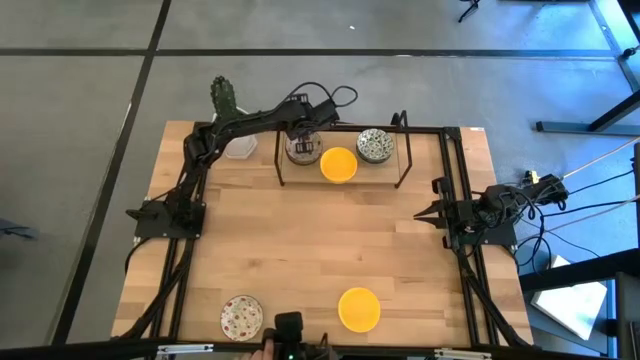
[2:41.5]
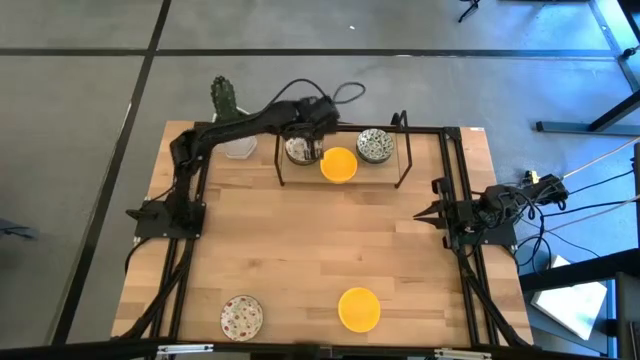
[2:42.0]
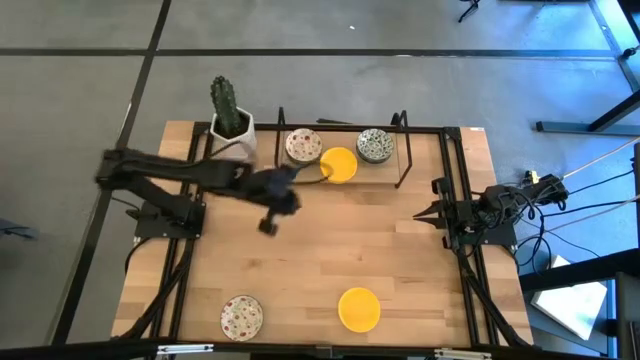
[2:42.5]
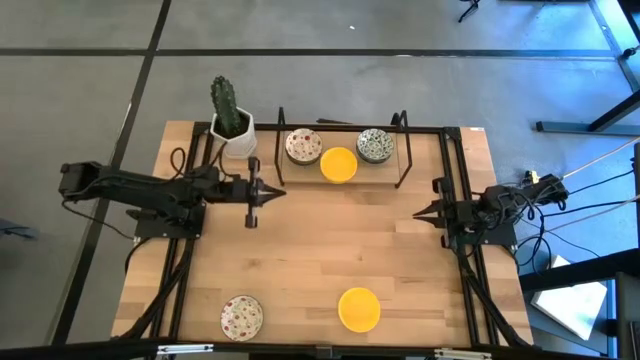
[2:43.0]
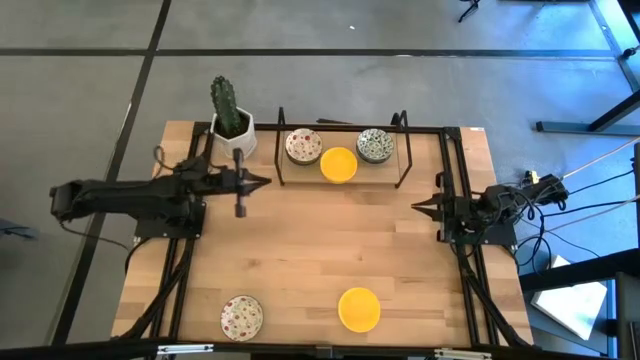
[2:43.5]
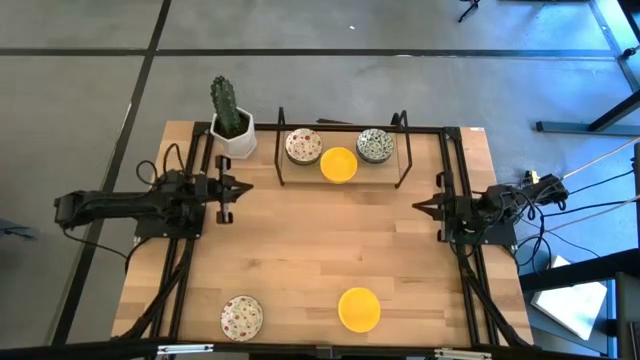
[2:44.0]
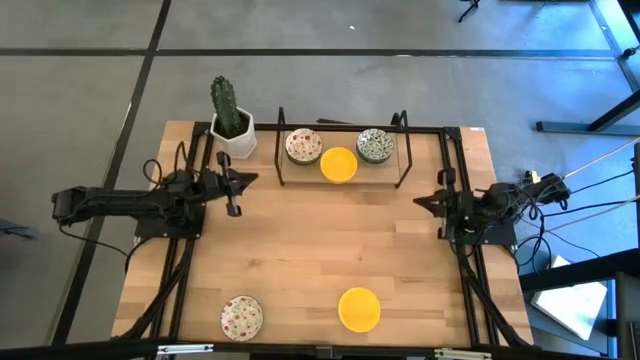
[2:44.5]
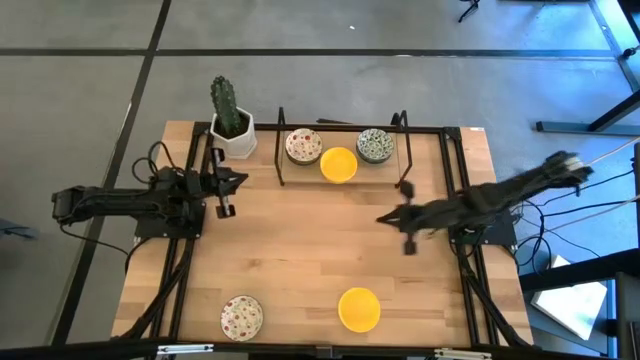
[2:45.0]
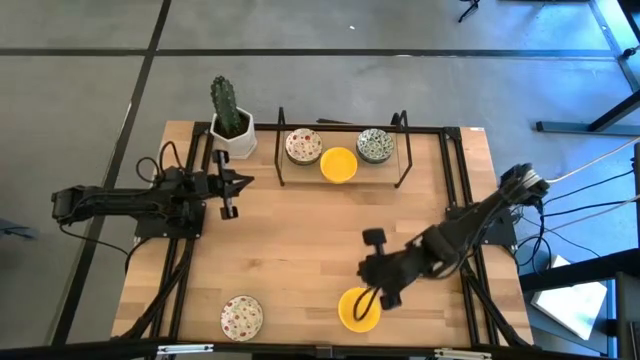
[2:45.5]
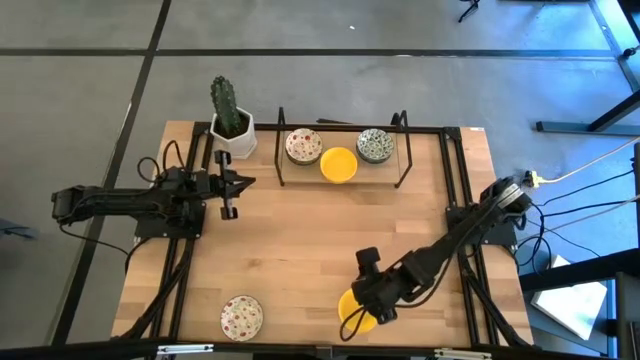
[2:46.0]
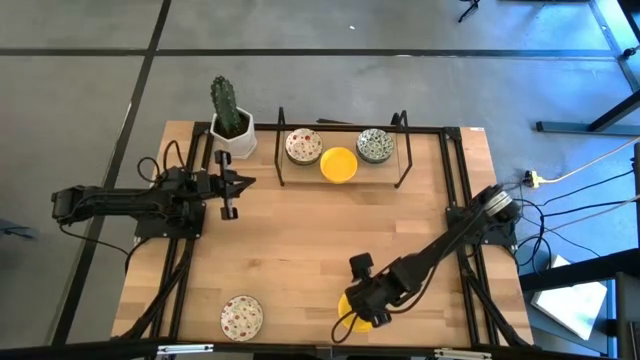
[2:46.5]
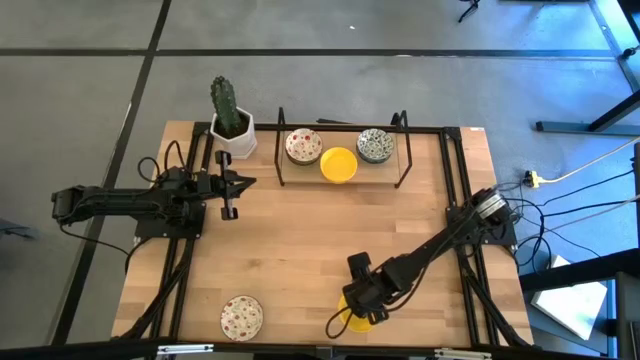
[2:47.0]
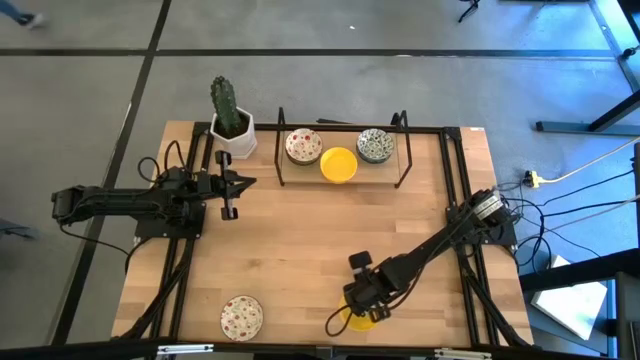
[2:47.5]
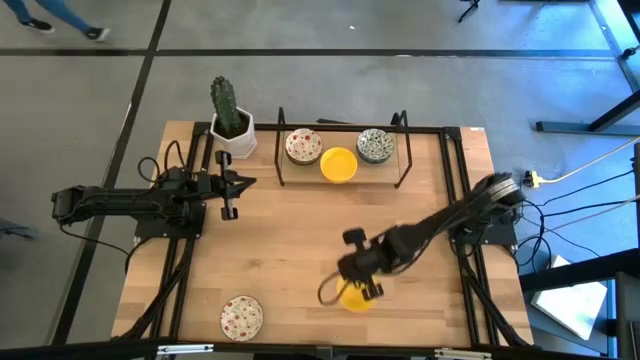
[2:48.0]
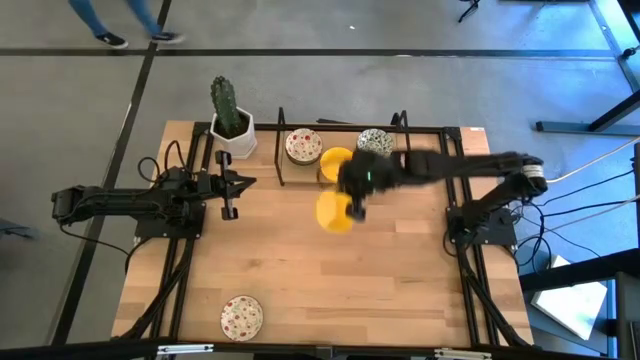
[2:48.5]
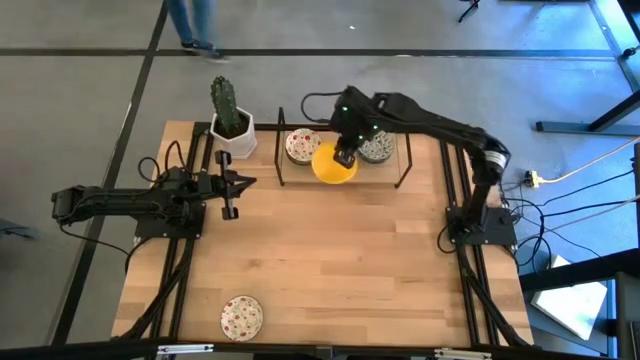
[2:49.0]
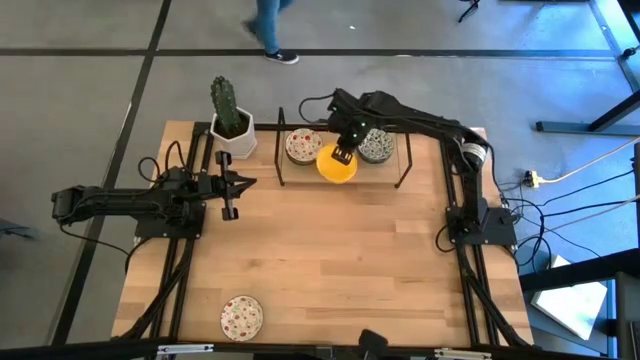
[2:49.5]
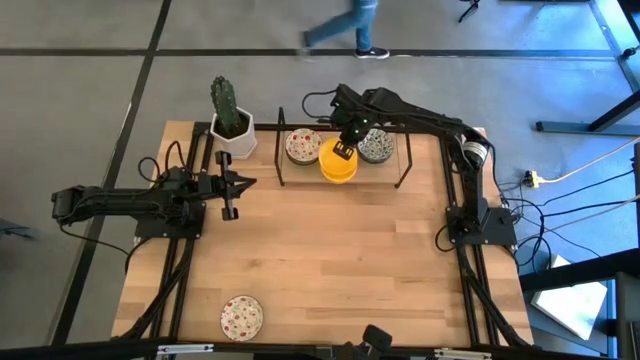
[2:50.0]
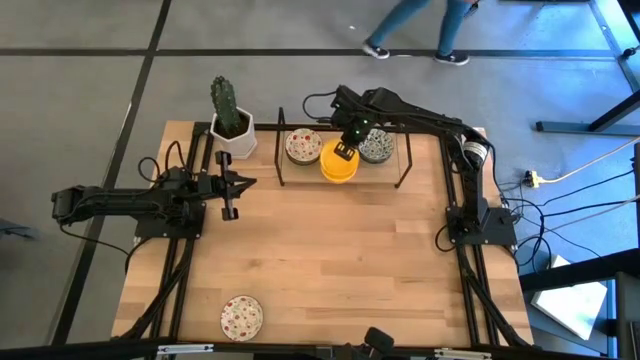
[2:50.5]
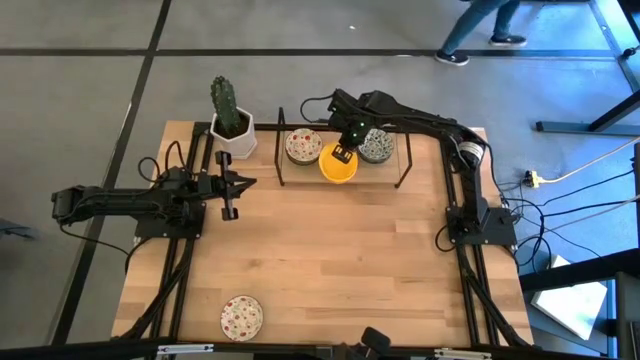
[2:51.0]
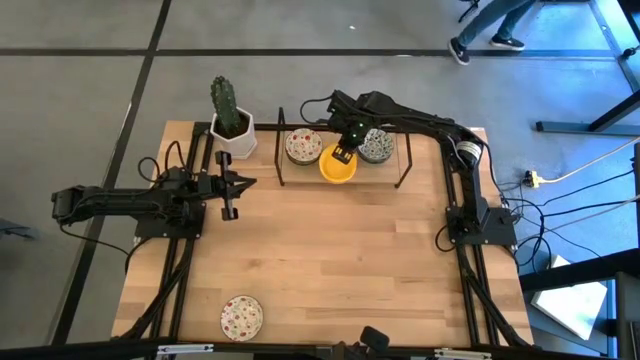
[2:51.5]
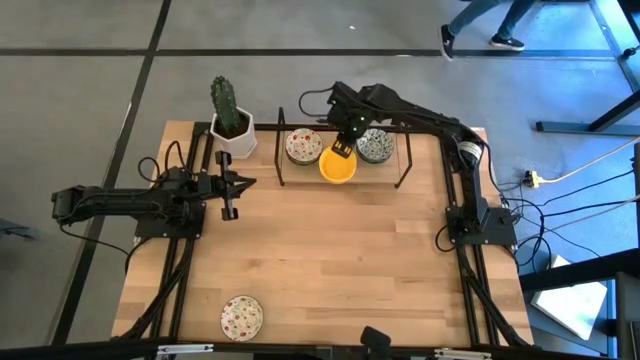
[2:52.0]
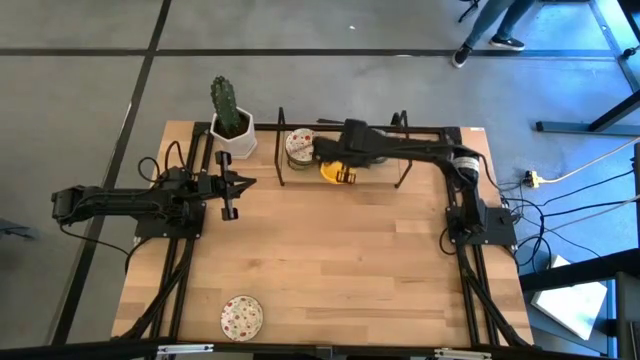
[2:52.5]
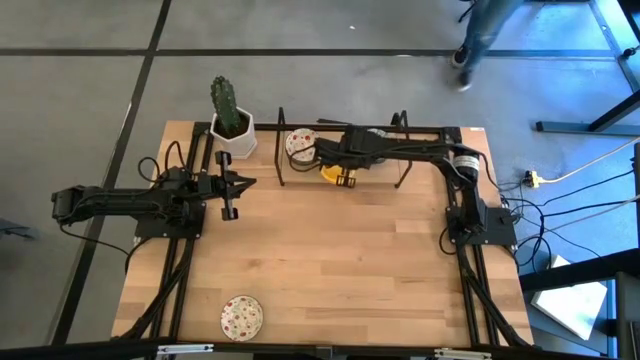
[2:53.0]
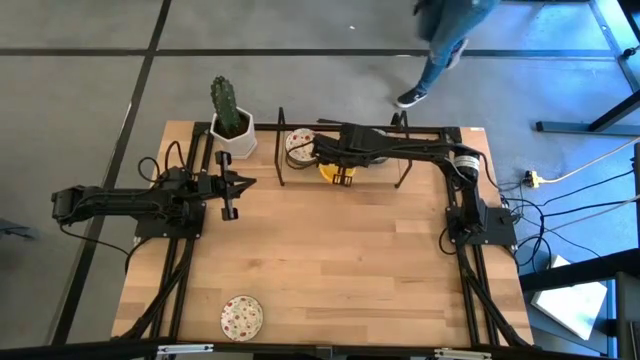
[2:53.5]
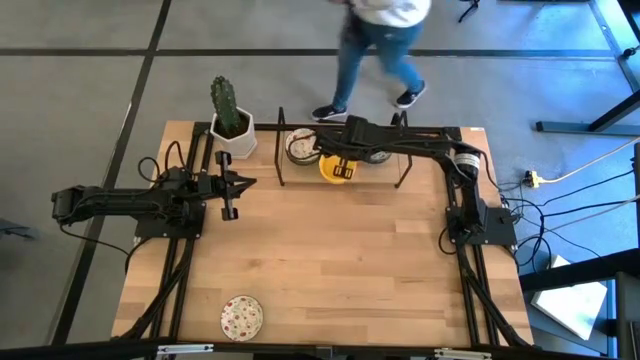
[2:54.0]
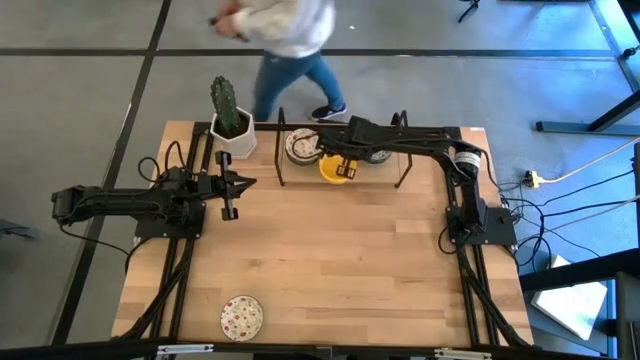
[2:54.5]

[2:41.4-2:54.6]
Task: Pick & Place Mini bowls
Stack the yellow bowl on the top of the yellow bowl on the shelf

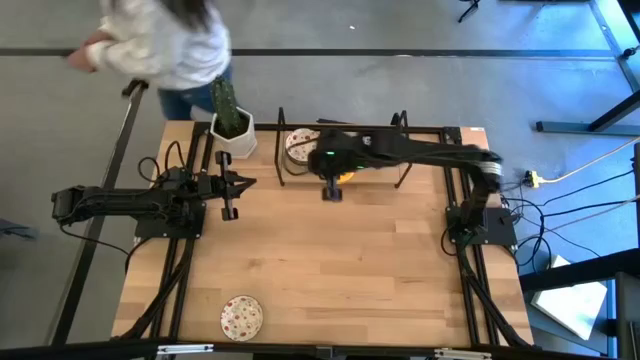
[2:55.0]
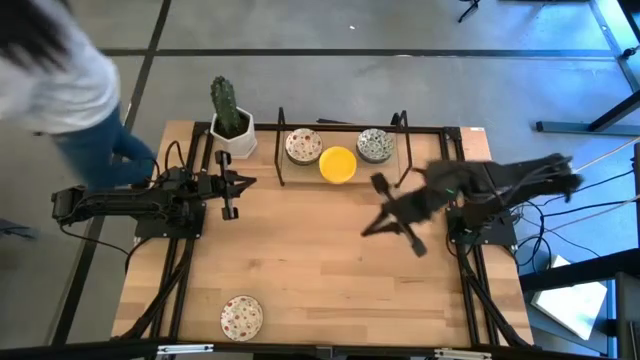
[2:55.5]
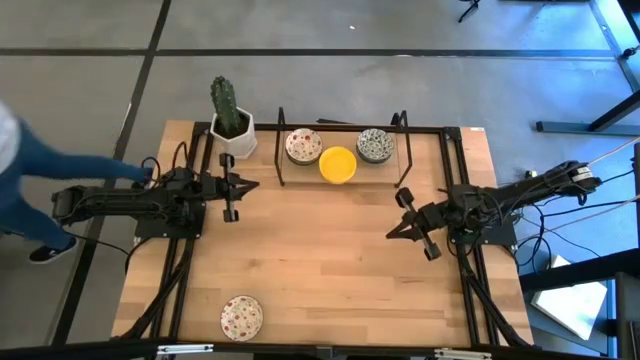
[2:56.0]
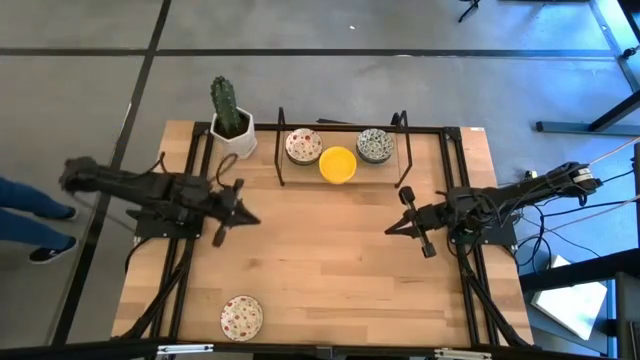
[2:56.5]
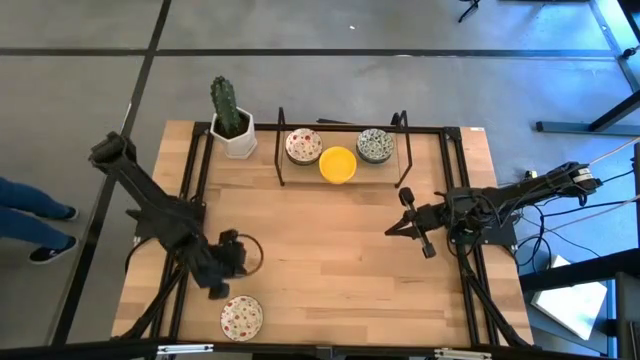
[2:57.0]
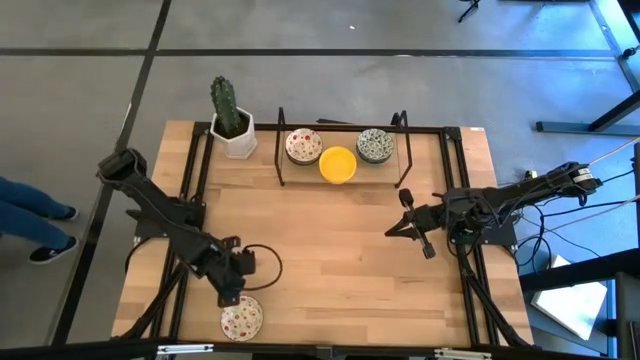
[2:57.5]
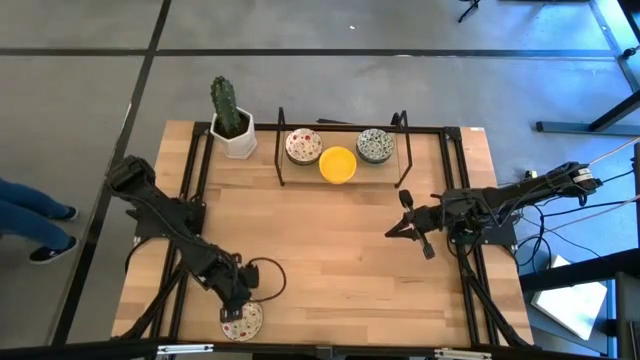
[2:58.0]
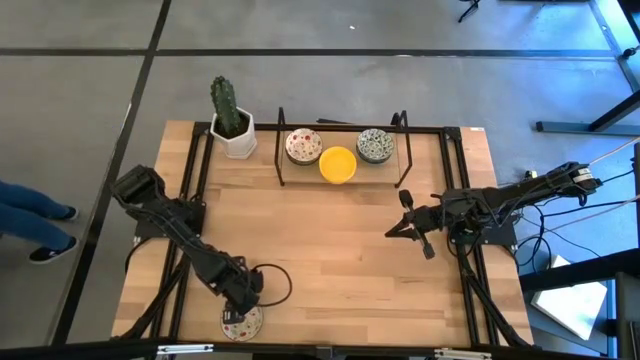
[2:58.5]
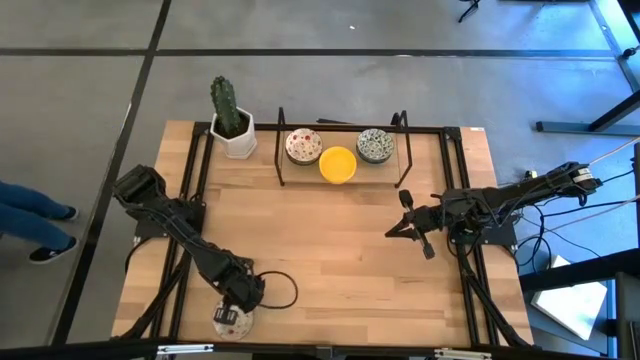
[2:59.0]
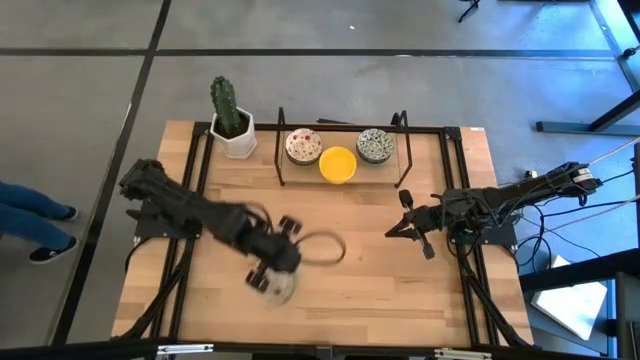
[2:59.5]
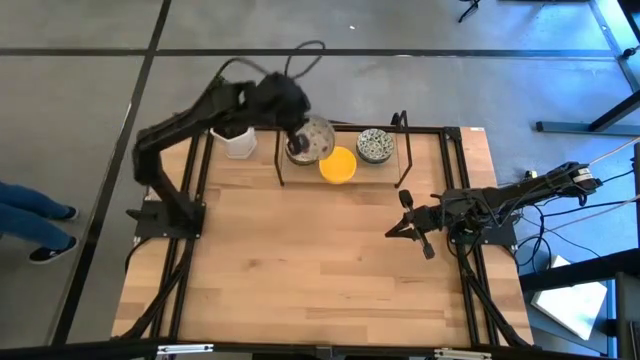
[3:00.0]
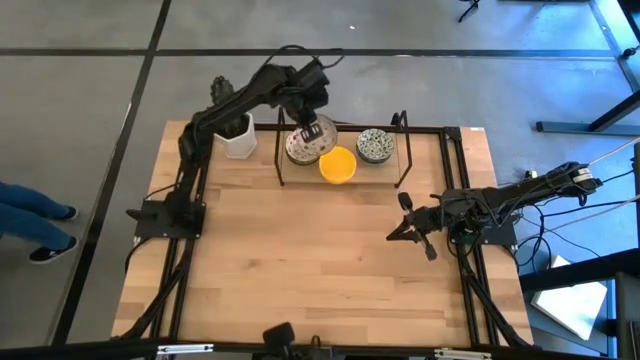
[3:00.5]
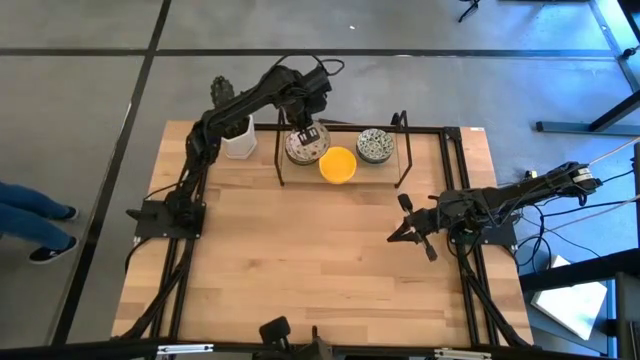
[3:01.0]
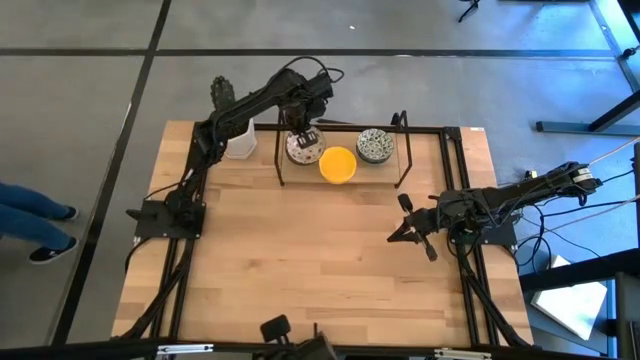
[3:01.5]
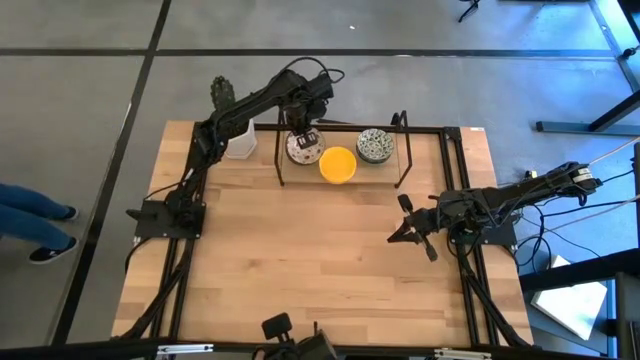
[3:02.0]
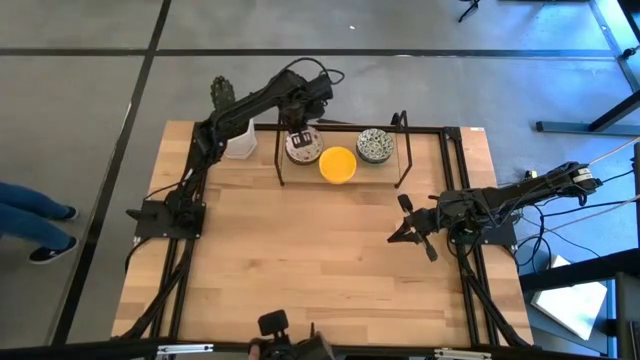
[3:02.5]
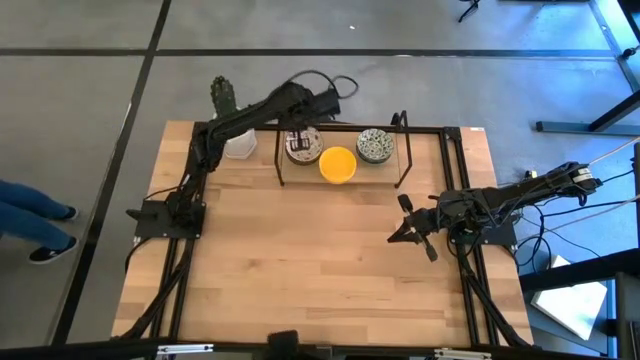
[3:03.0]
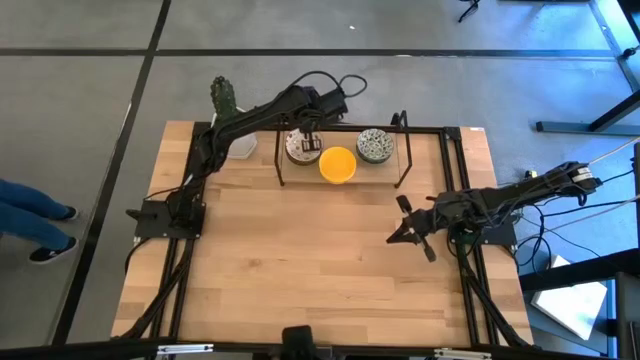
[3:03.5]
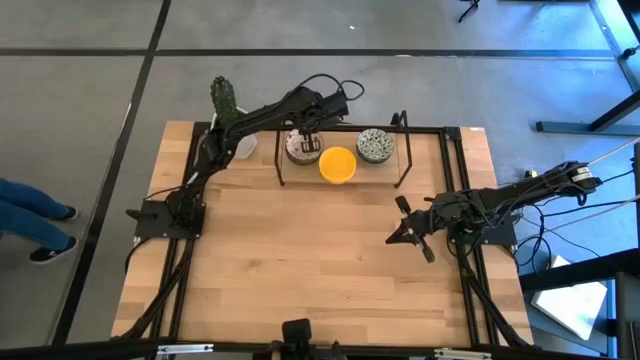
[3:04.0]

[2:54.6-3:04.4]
Stack the white red patterned bowl on top of the white red patterned bowl on the shelf
